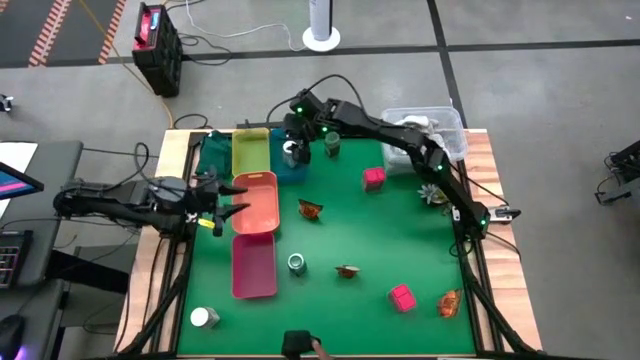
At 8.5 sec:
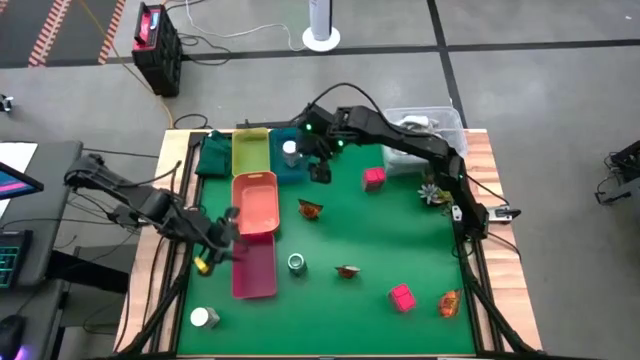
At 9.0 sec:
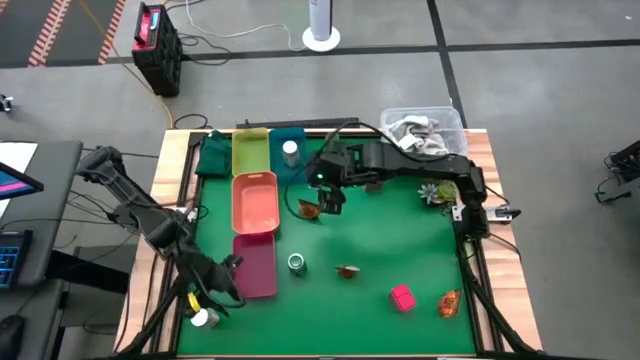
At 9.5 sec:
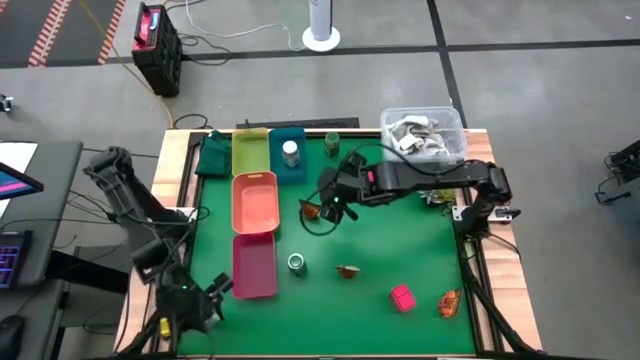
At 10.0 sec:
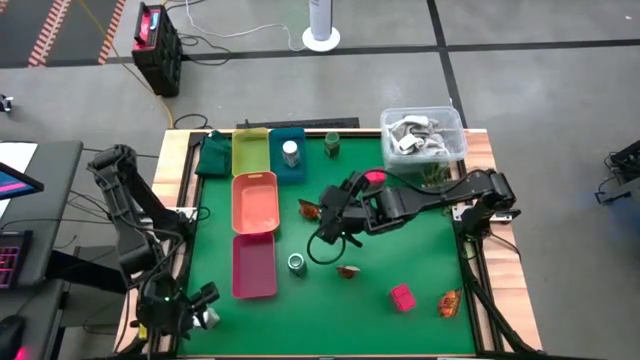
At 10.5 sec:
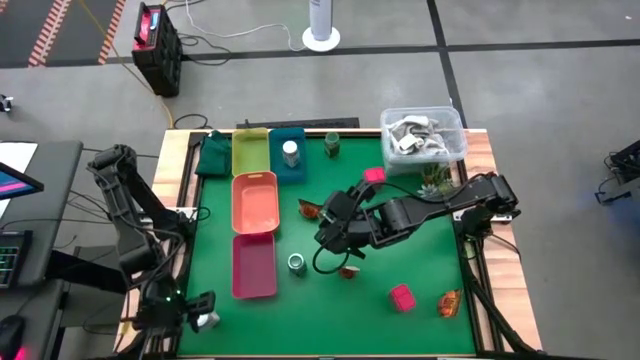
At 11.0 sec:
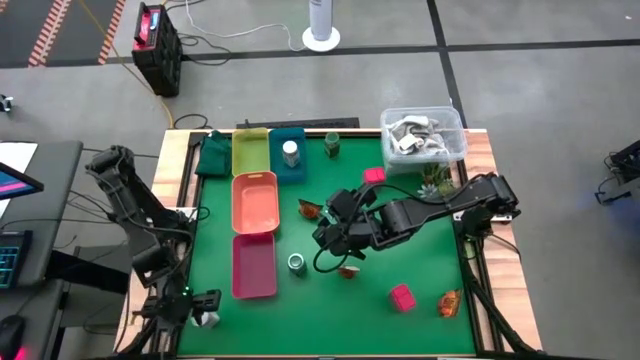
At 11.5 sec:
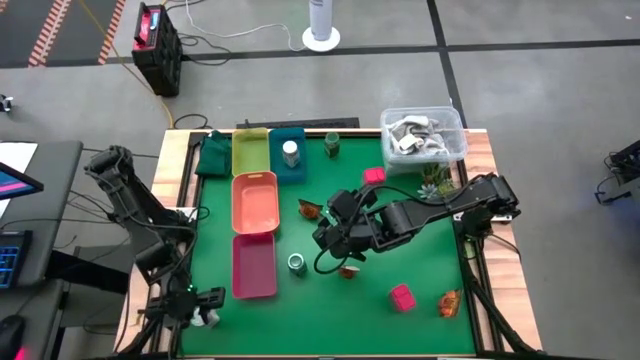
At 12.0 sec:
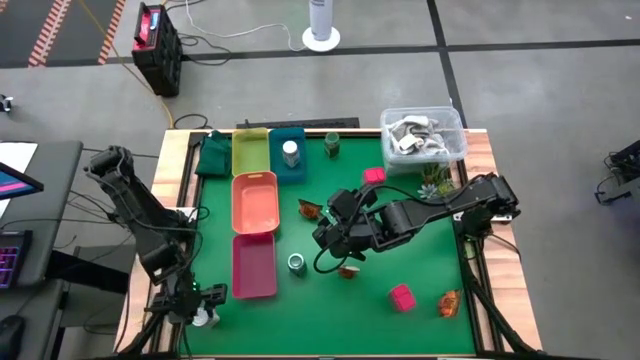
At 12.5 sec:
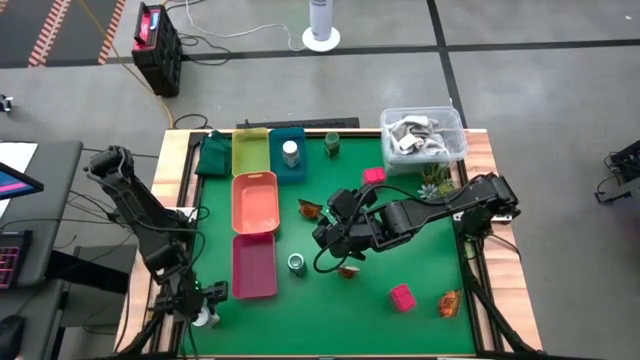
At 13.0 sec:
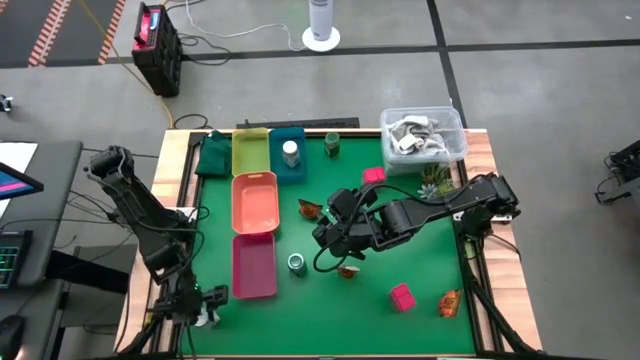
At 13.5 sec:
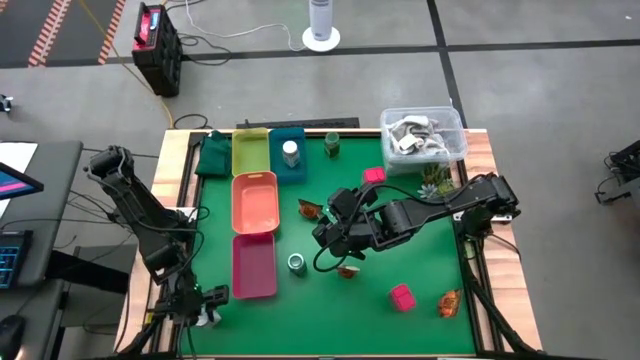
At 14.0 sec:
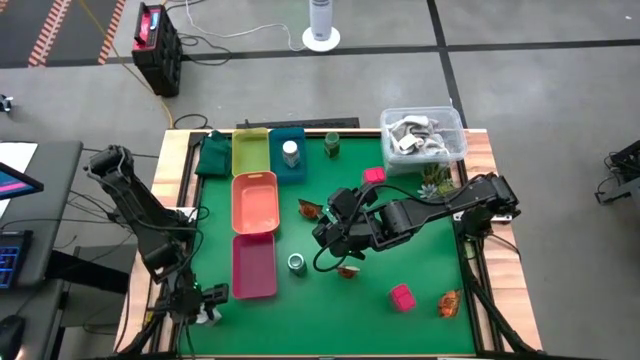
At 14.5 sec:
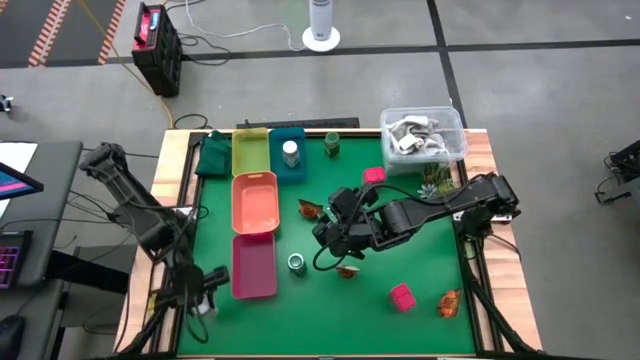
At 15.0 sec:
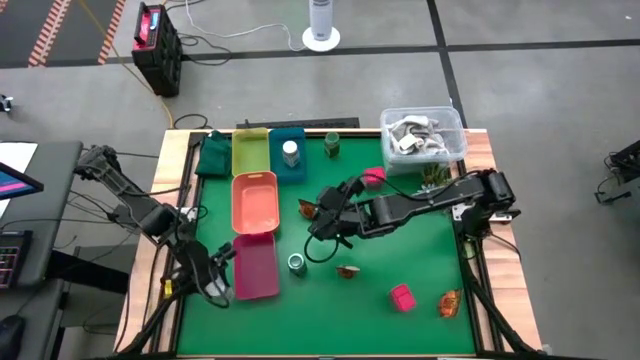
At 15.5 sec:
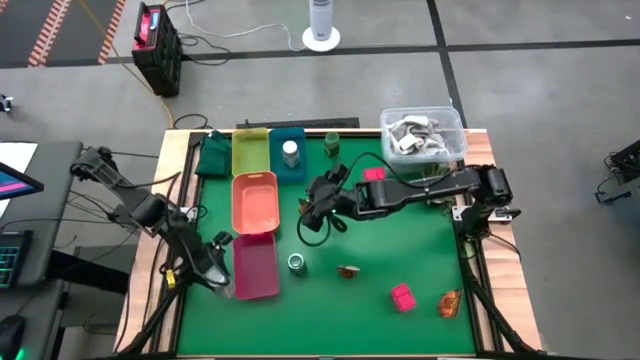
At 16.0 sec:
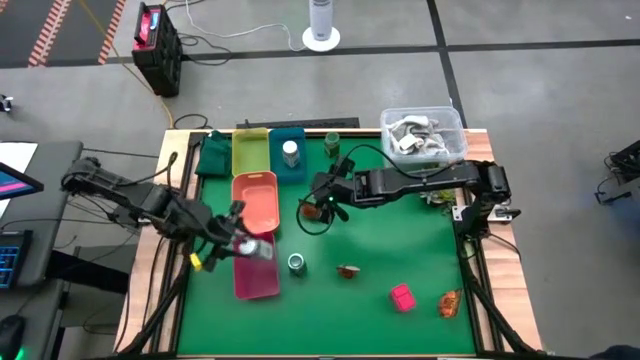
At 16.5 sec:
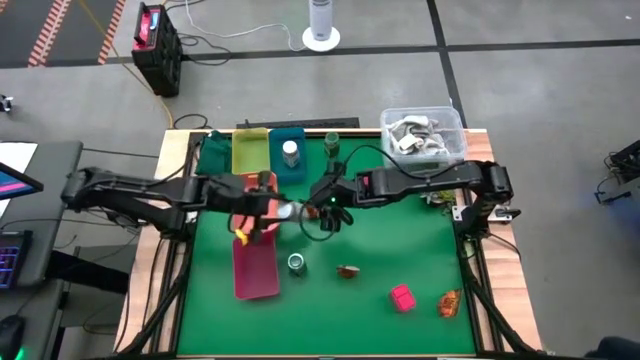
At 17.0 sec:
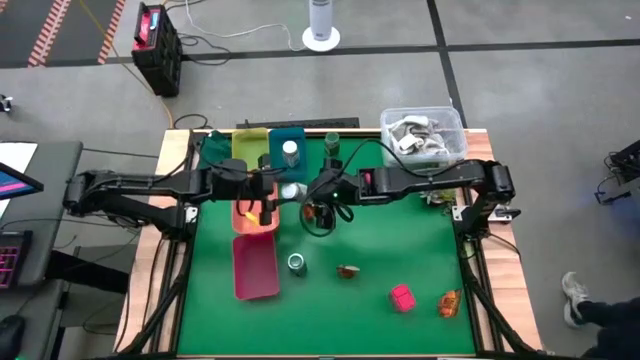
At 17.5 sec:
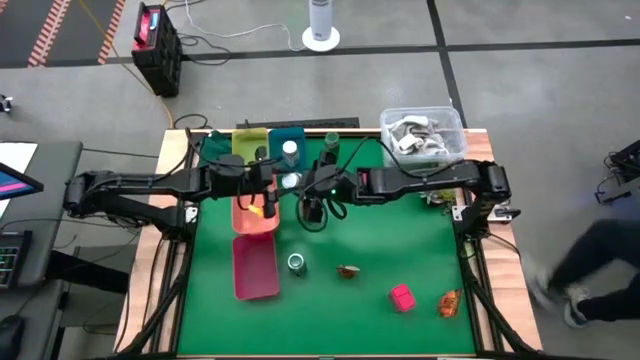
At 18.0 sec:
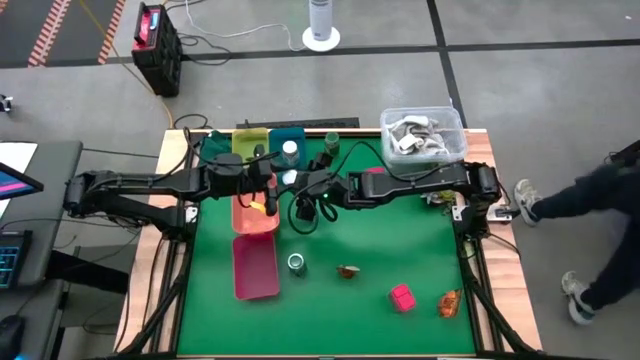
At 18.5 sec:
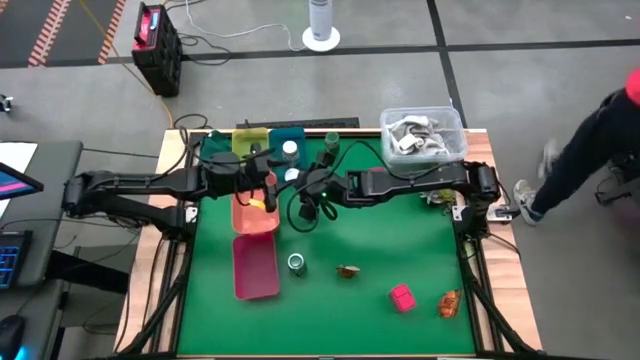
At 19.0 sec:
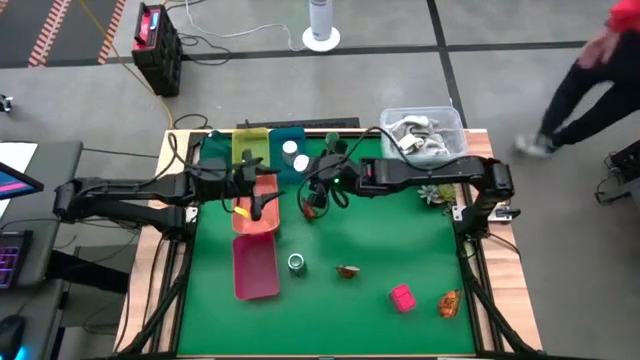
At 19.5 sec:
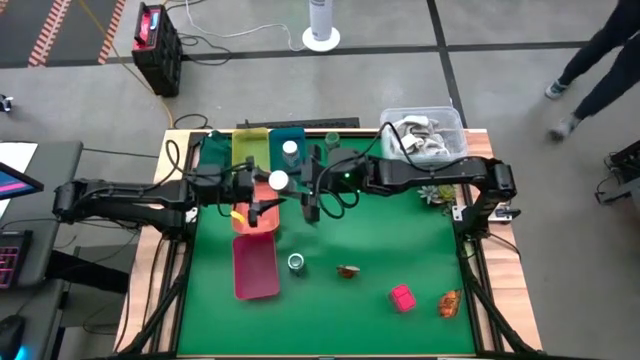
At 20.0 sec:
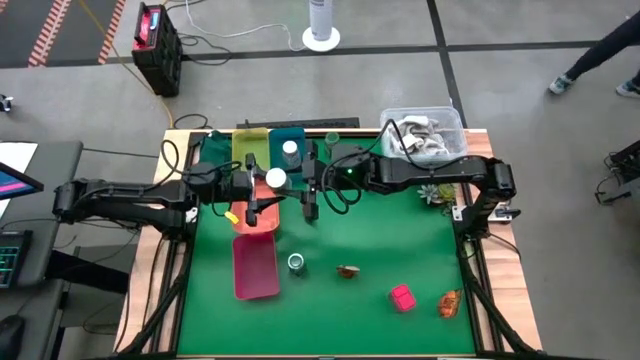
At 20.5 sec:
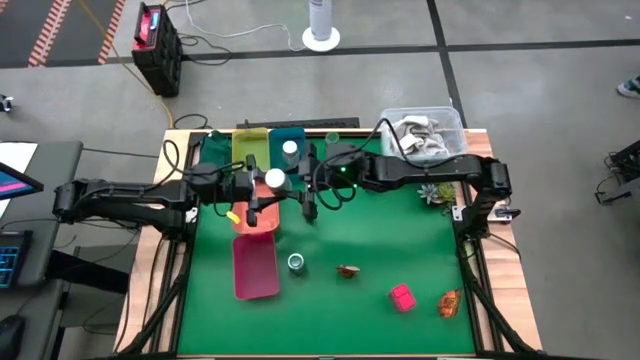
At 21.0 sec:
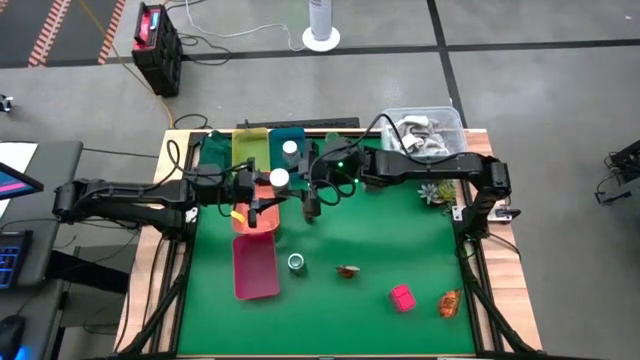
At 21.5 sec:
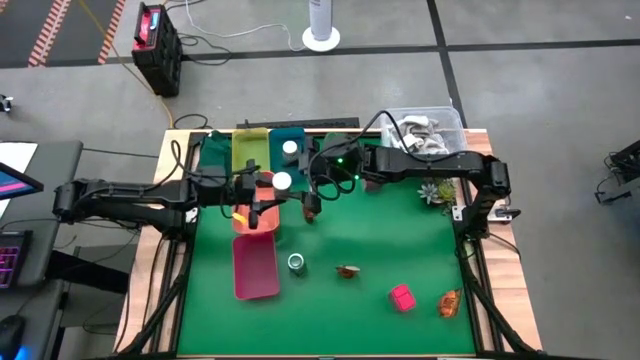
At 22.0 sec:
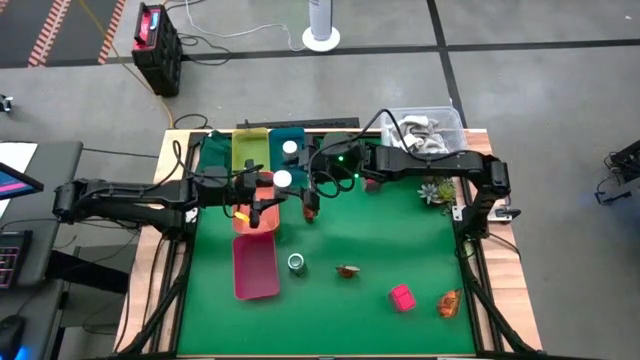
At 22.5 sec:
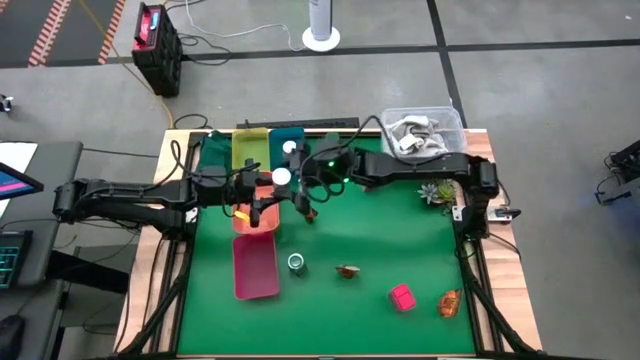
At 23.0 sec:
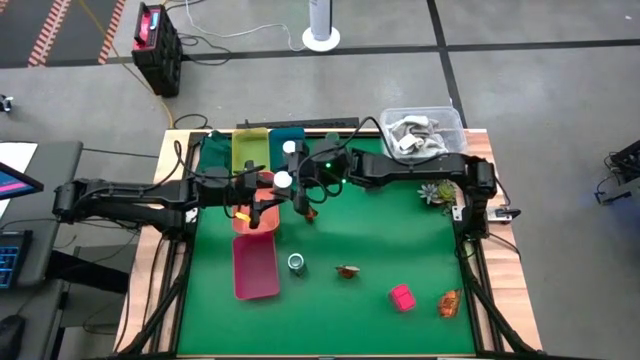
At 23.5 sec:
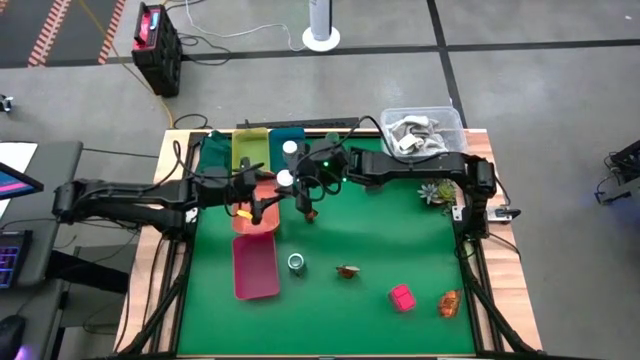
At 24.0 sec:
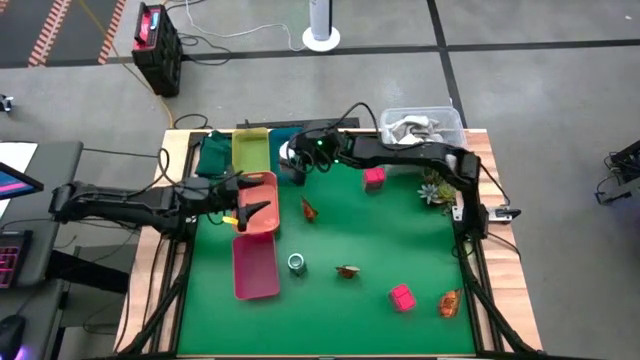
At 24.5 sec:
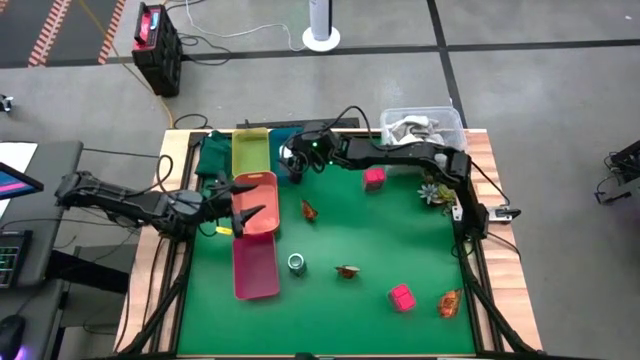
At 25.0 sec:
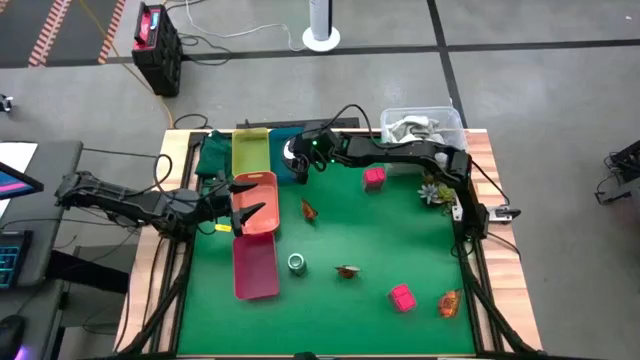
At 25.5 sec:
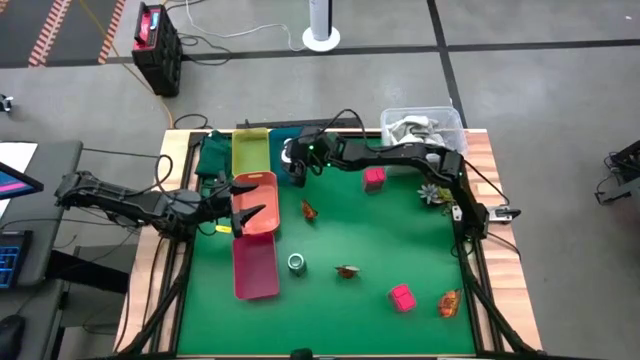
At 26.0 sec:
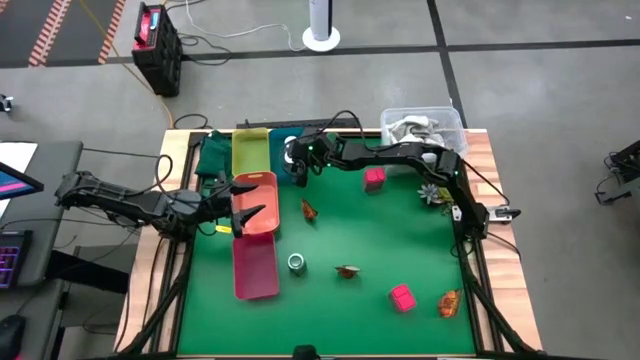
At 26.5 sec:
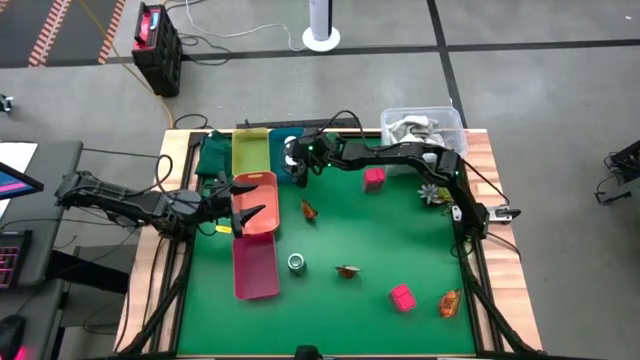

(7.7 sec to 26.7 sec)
Task: Sort spices by type
Put the white seasoning bottle into the blue bin

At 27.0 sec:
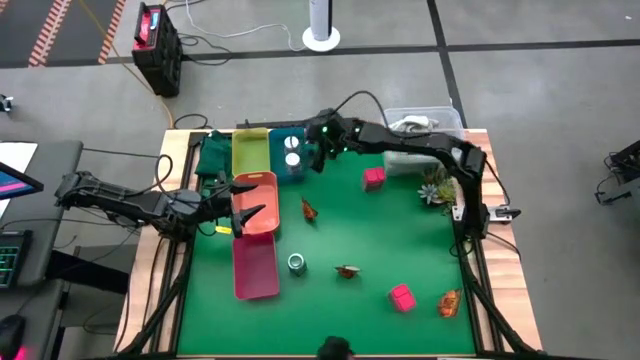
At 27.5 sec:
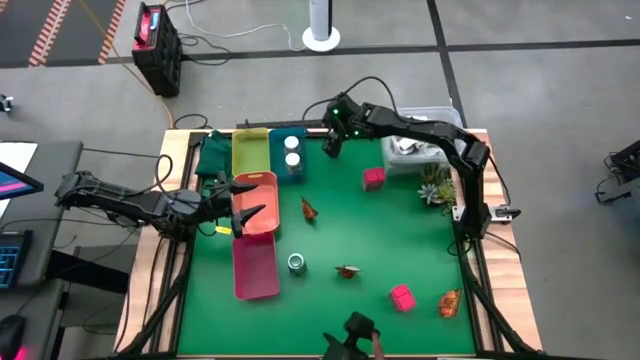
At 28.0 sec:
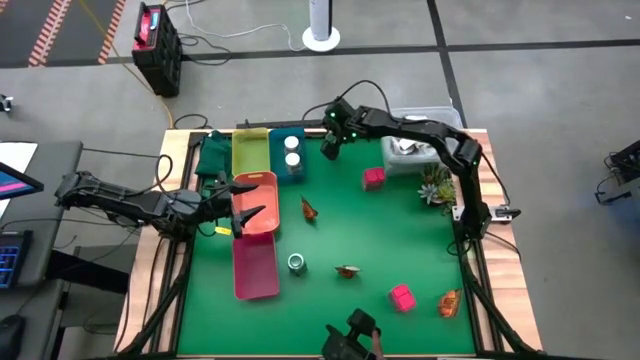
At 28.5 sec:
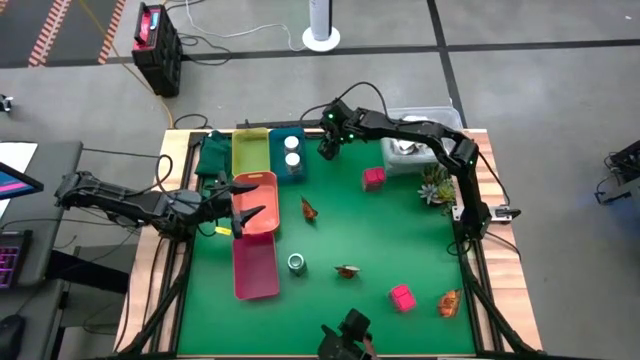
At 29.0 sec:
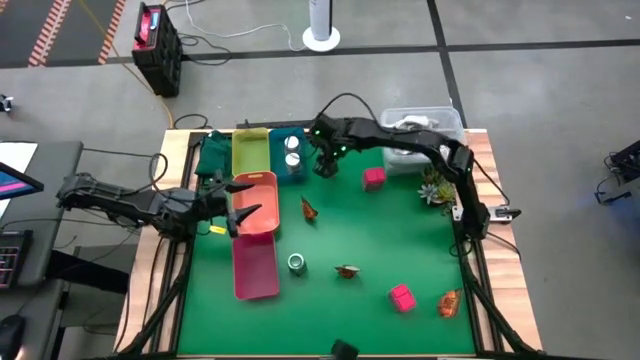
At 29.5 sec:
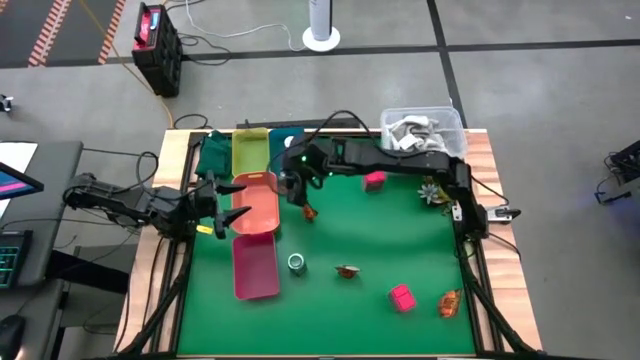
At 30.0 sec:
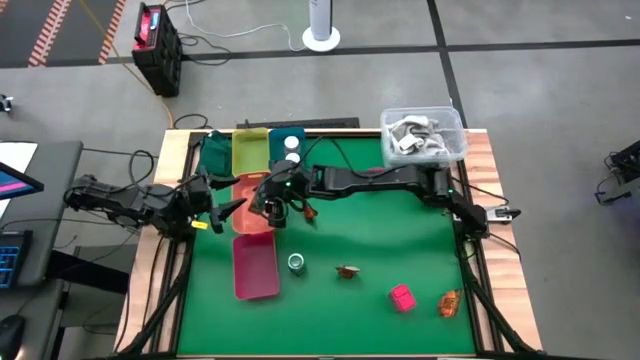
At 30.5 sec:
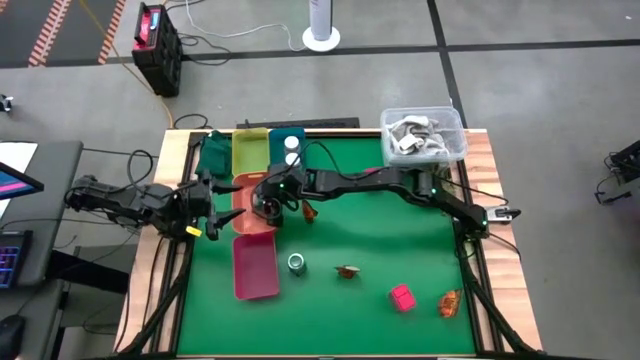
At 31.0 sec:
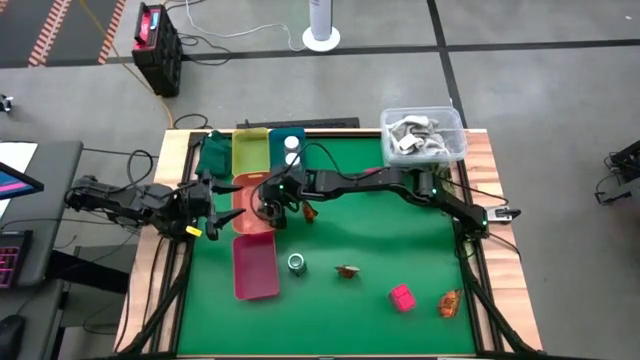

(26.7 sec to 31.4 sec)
Put the top green seasoning bottle into the orange bin
